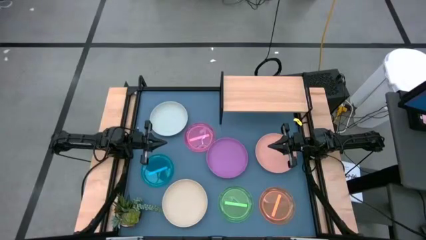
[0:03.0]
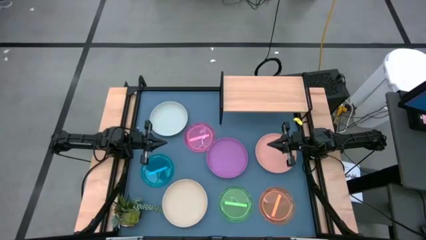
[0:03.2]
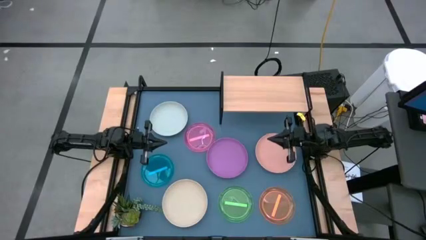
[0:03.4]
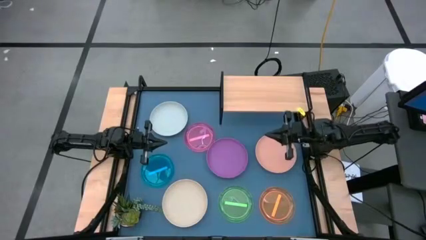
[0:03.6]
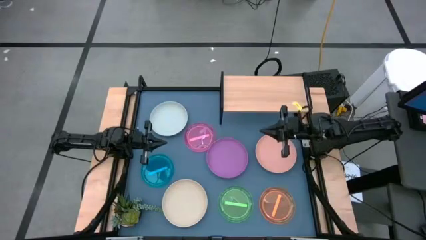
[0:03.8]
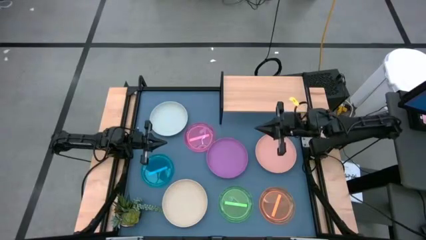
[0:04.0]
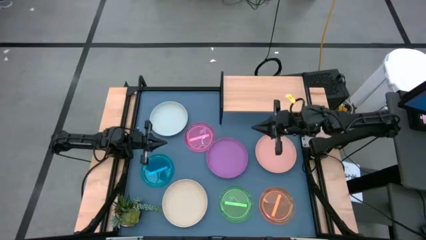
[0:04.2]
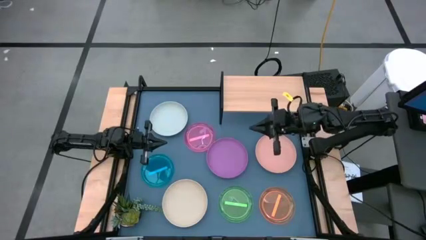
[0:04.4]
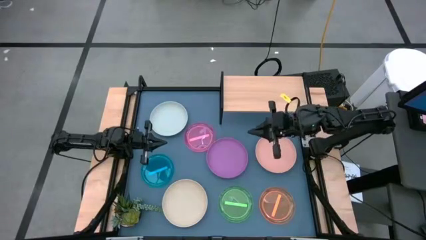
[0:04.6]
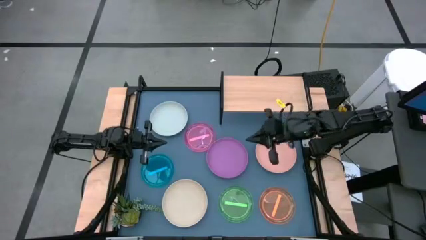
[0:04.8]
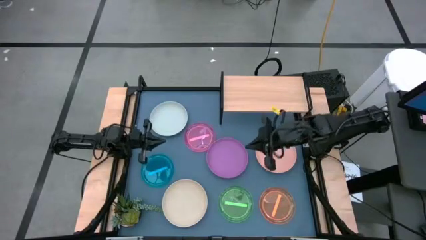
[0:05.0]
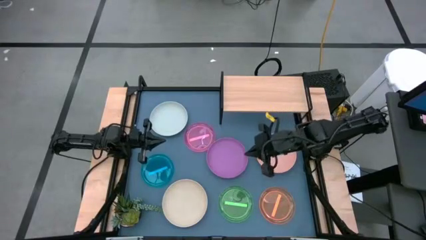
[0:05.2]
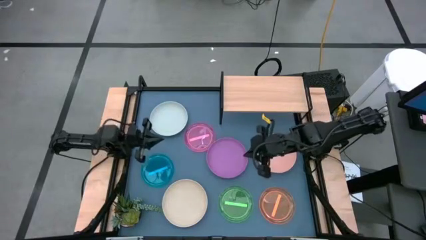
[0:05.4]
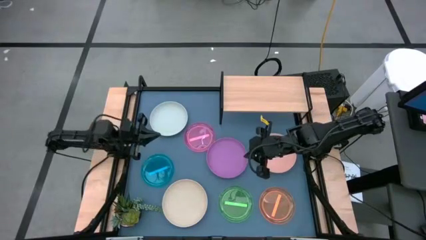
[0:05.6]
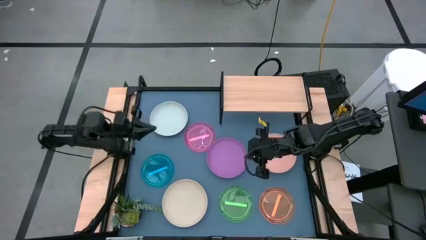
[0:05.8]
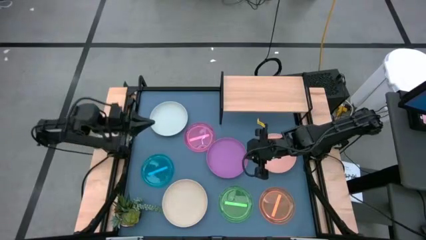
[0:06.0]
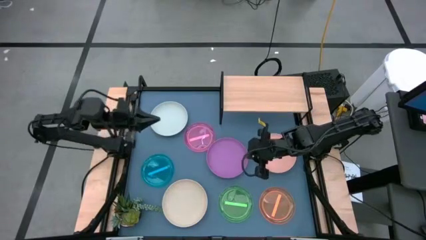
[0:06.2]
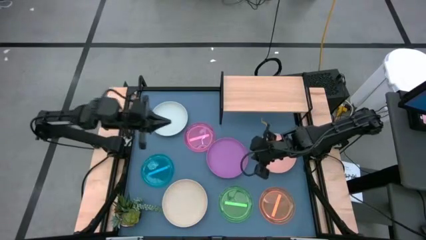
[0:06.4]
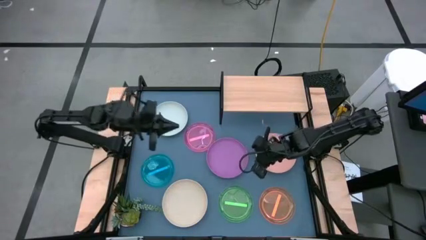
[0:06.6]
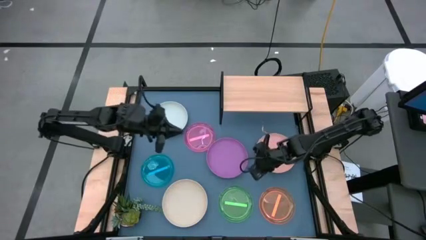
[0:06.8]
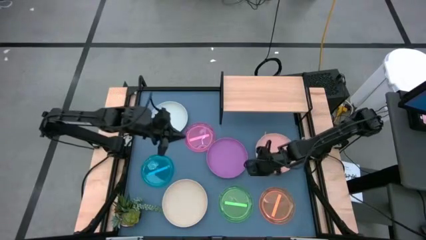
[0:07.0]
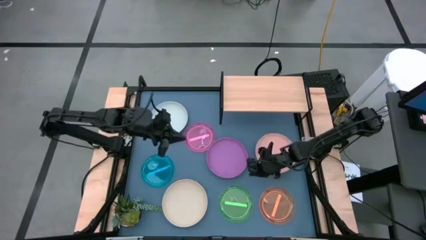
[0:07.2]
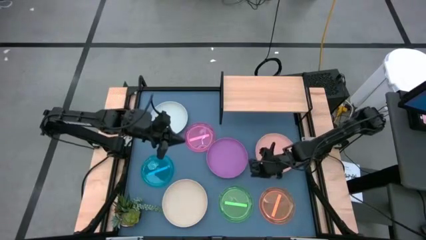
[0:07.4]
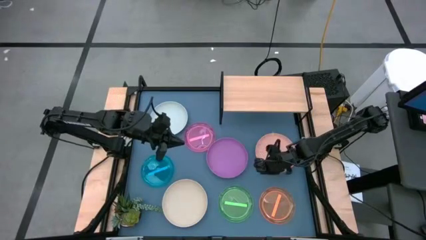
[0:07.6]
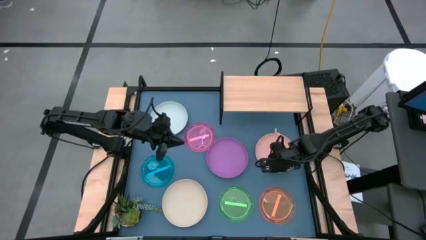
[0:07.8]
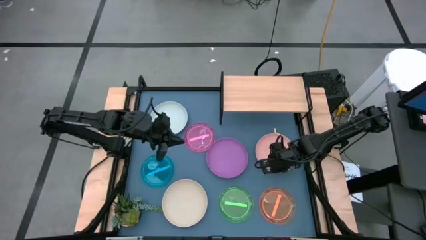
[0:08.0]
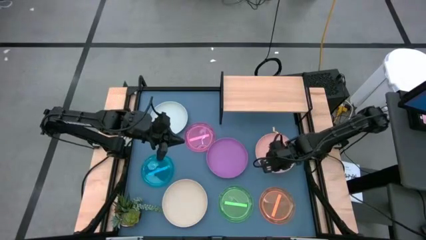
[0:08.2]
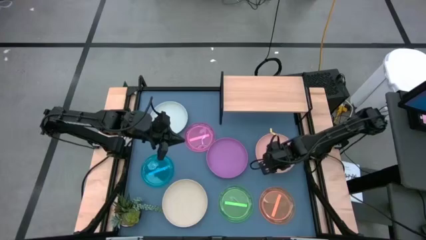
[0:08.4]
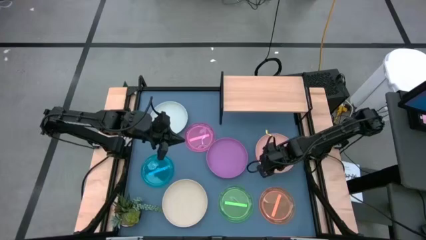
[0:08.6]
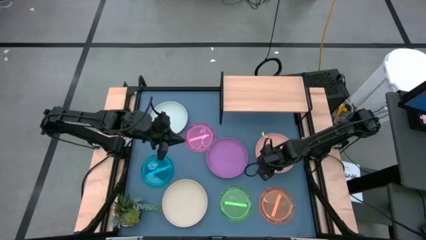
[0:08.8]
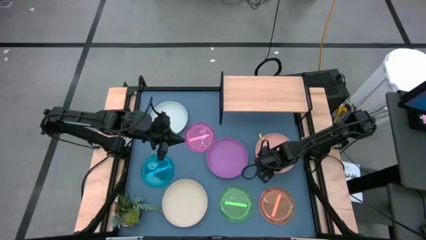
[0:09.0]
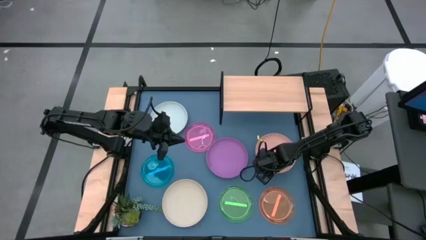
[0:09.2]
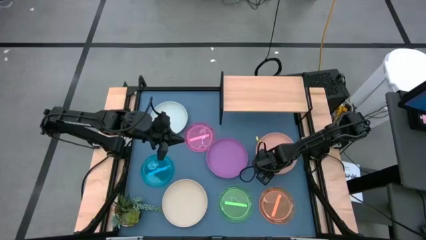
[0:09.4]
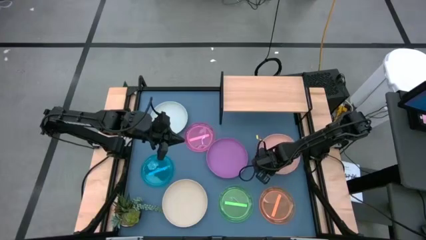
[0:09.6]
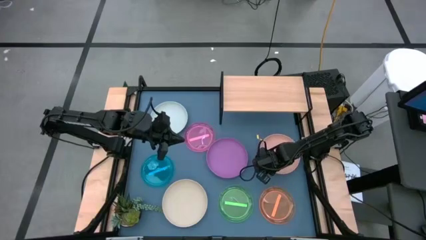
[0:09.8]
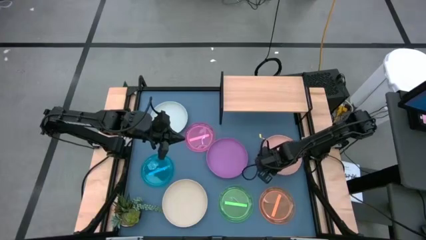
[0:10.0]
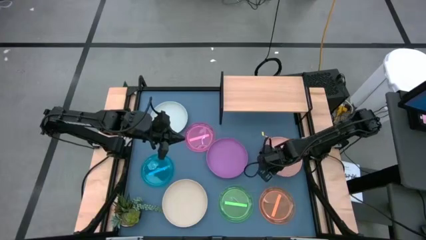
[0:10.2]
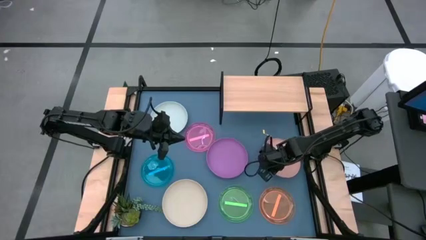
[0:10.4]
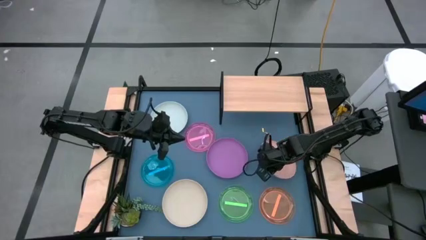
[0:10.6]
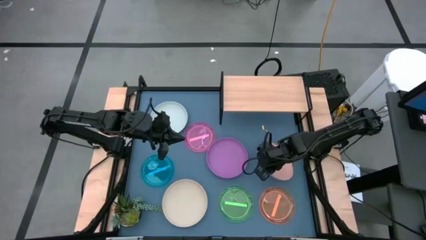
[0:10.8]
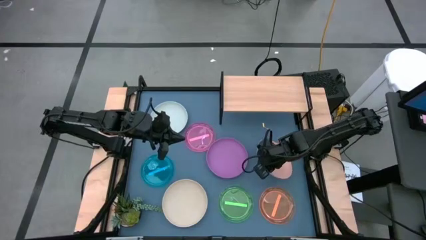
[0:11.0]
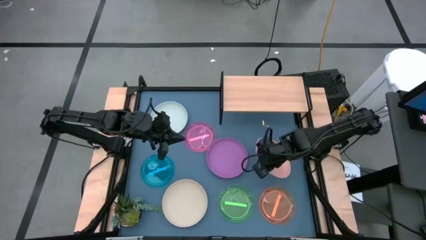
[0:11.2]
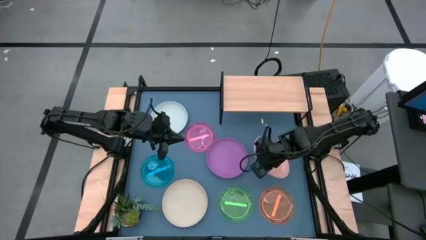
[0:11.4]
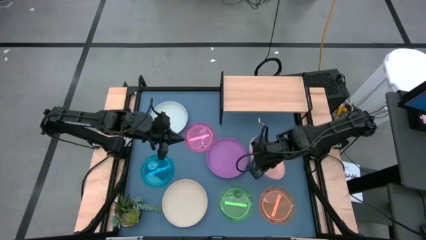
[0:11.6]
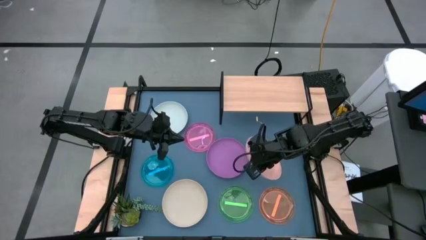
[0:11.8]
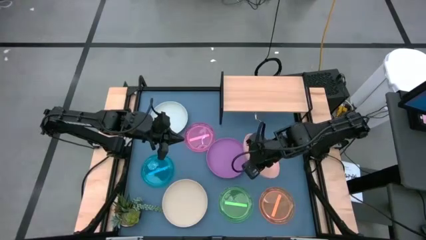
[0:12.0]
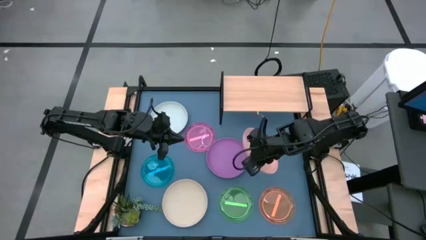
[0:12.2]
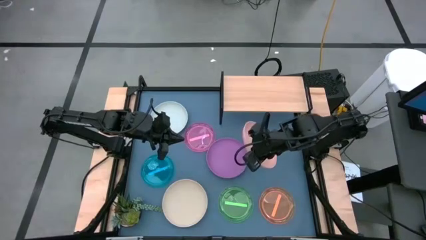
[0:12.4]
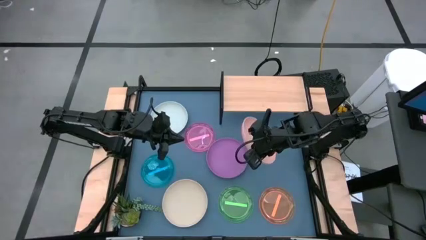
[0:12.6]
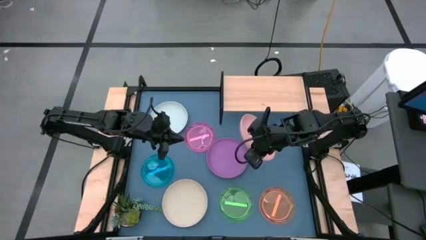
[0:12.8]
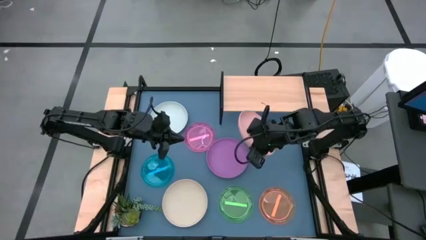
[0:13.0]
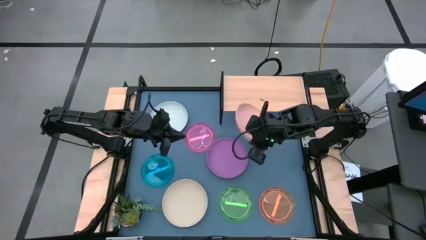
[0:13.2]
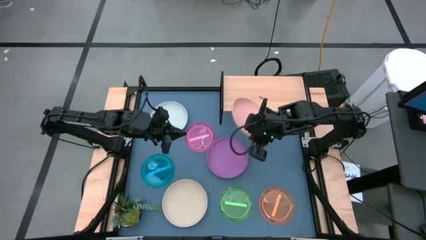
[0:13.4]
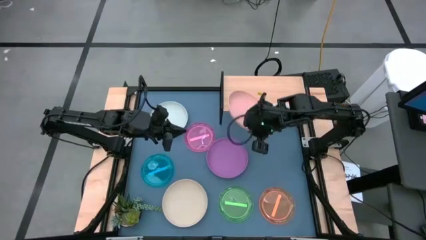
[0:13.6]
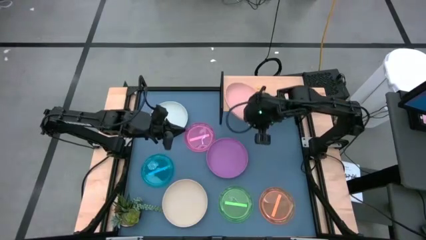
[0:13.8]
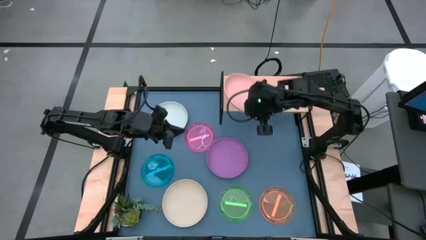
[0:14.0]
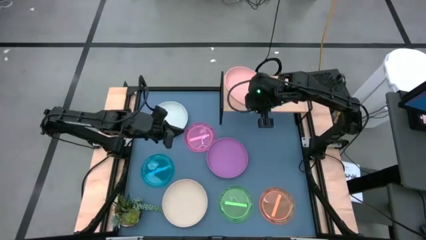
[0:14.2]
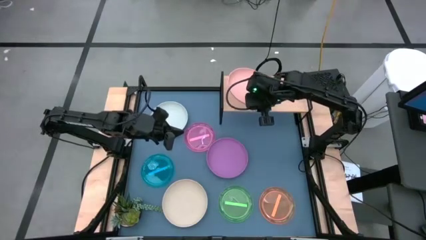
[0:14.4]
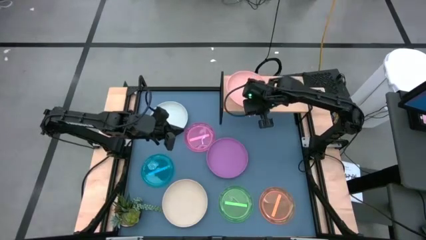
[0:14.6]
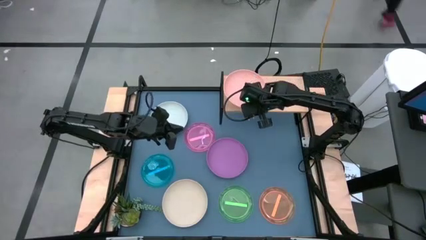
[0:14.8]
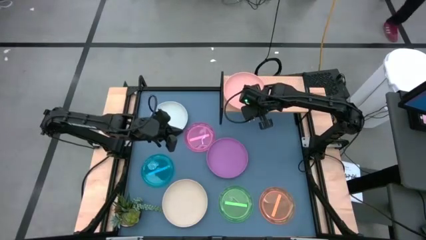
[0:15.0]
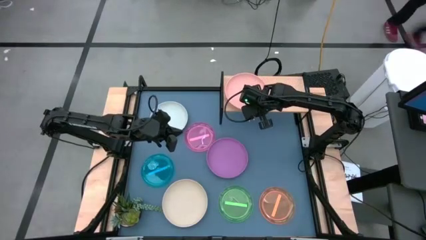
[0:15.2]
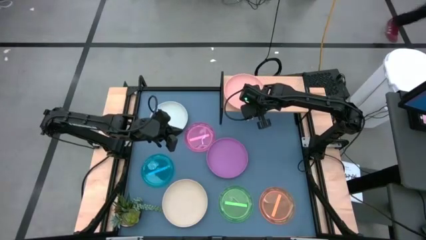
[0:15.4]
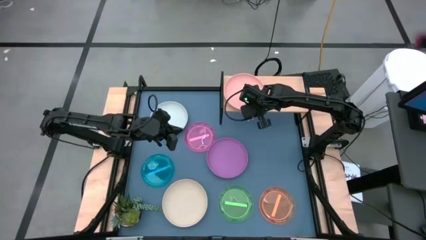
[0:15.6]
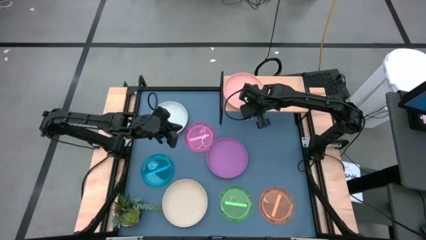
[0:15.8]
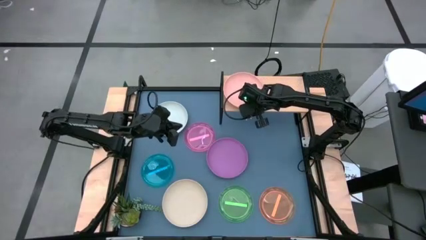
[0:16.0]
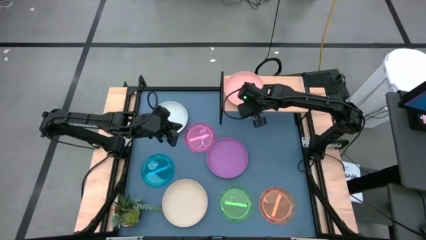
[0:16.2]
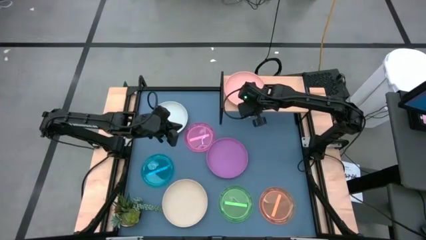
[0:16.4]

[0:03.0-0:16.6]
Task: Place and stack plates onto a shelf
Put the large light orange plate on the shelf
